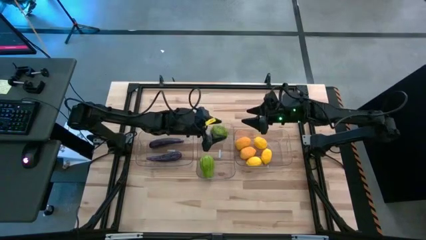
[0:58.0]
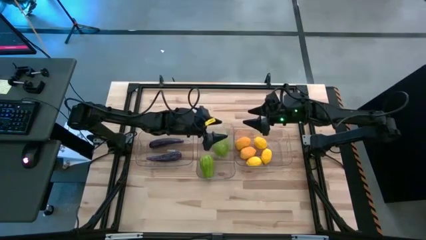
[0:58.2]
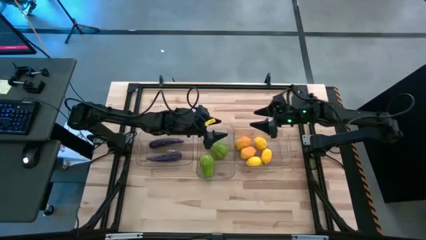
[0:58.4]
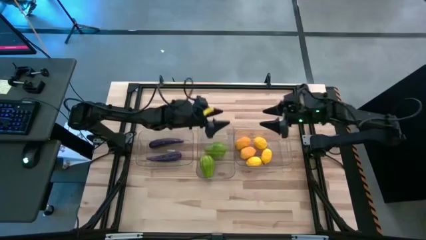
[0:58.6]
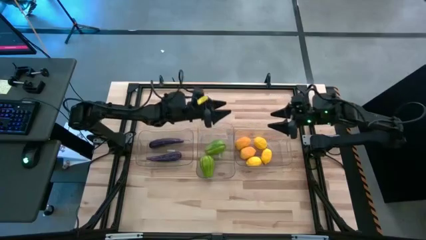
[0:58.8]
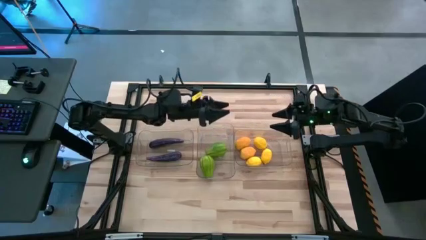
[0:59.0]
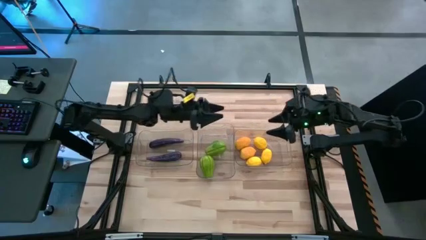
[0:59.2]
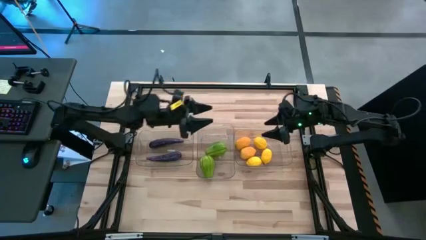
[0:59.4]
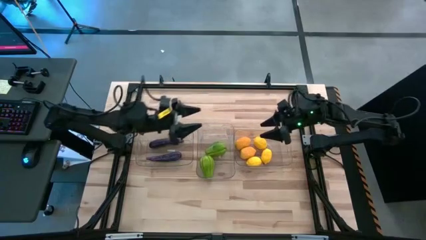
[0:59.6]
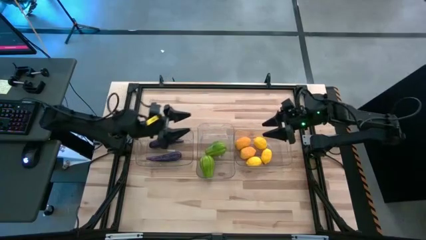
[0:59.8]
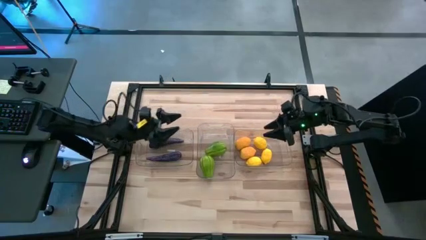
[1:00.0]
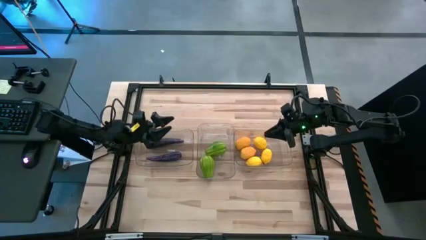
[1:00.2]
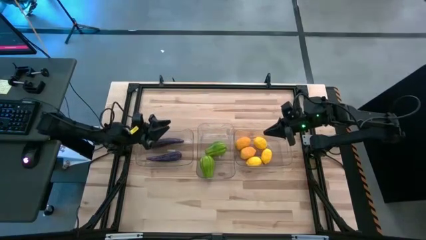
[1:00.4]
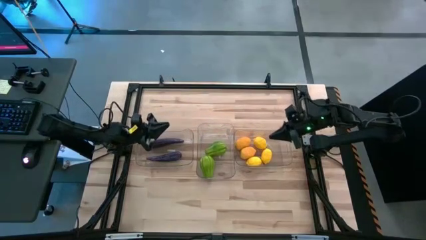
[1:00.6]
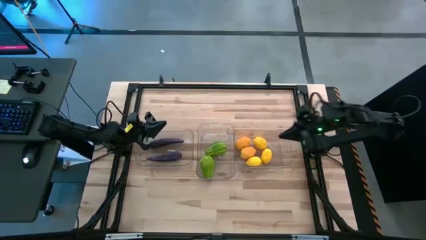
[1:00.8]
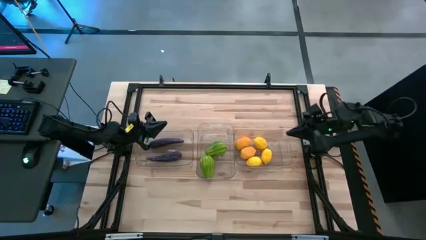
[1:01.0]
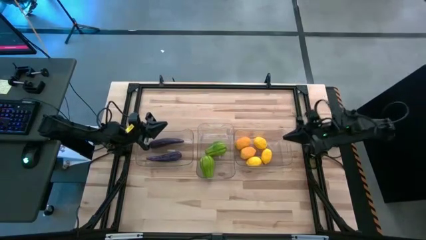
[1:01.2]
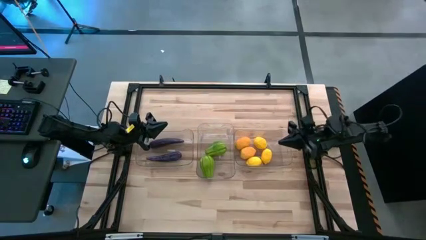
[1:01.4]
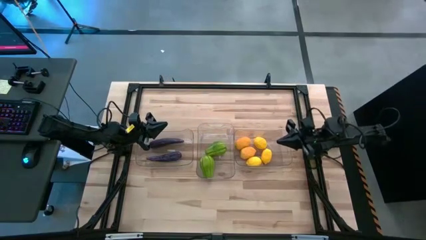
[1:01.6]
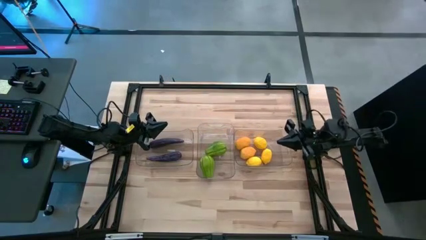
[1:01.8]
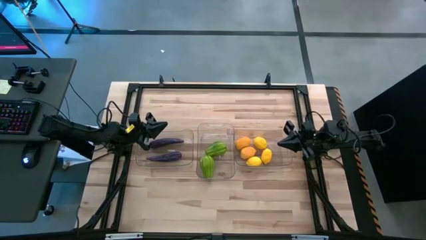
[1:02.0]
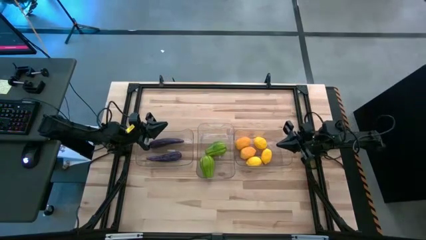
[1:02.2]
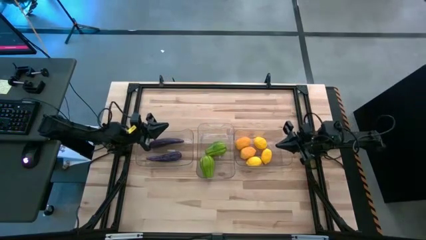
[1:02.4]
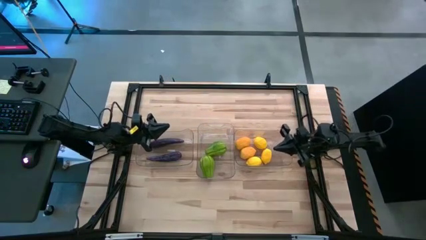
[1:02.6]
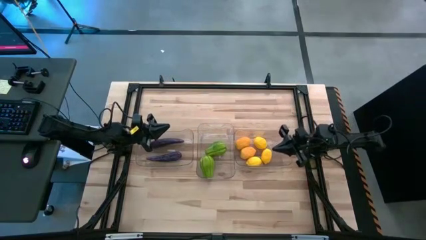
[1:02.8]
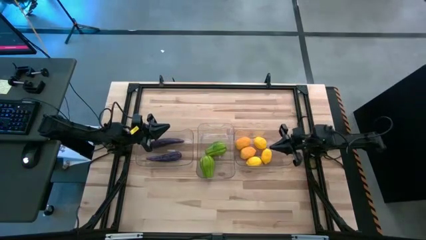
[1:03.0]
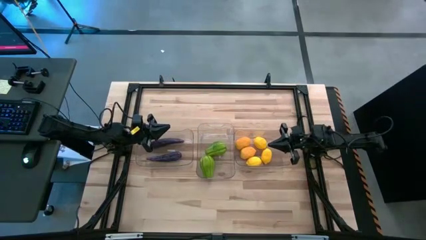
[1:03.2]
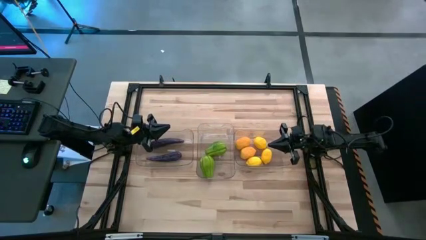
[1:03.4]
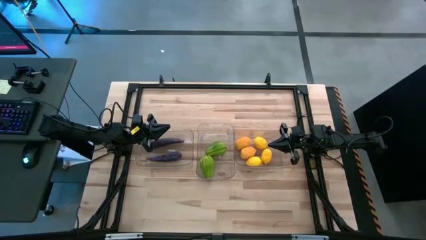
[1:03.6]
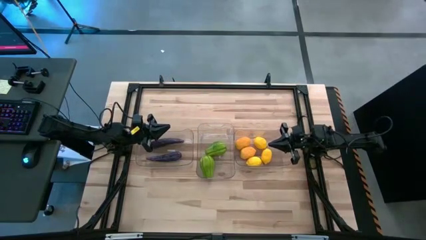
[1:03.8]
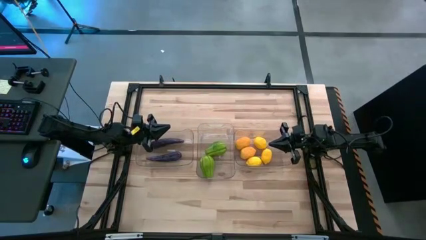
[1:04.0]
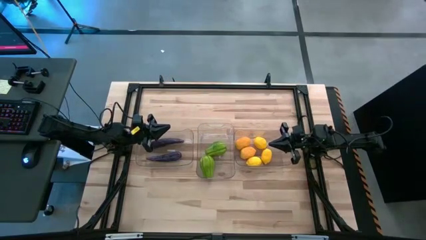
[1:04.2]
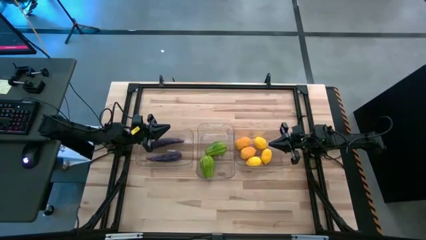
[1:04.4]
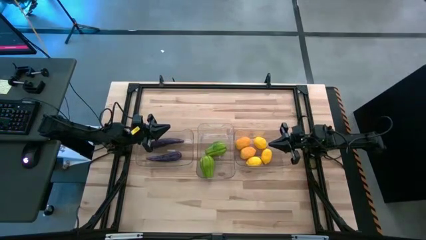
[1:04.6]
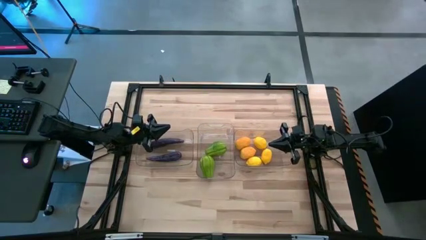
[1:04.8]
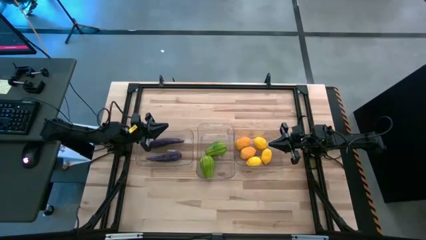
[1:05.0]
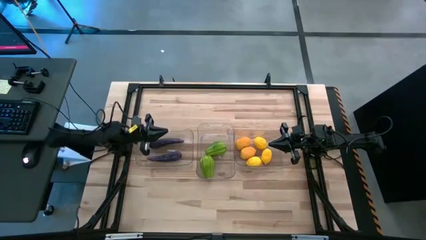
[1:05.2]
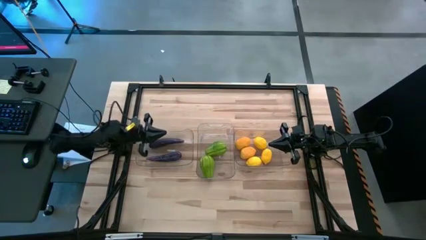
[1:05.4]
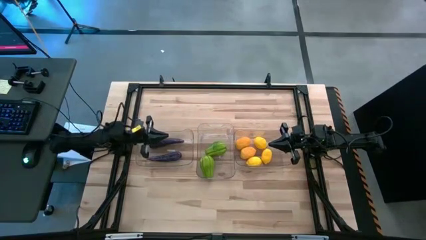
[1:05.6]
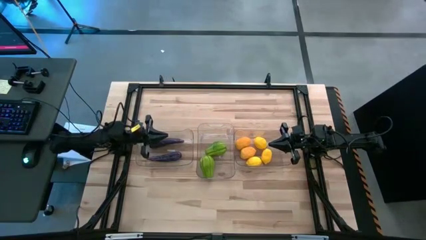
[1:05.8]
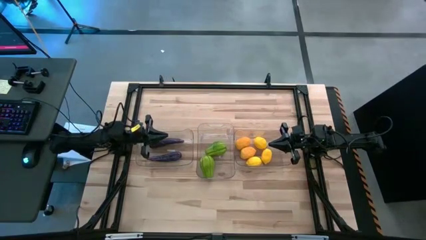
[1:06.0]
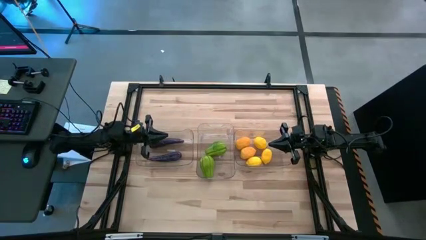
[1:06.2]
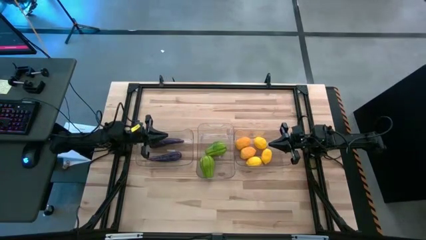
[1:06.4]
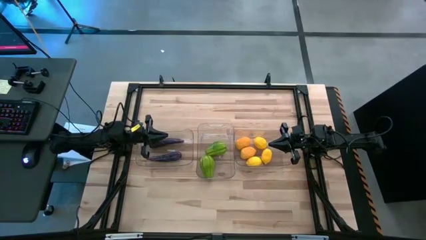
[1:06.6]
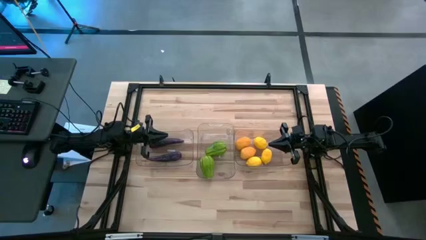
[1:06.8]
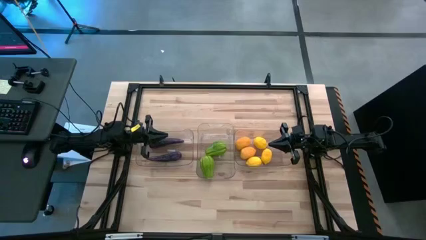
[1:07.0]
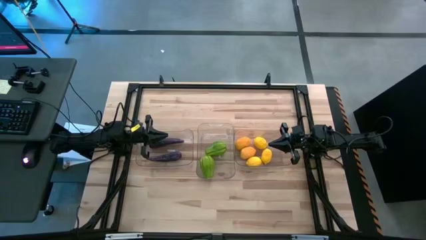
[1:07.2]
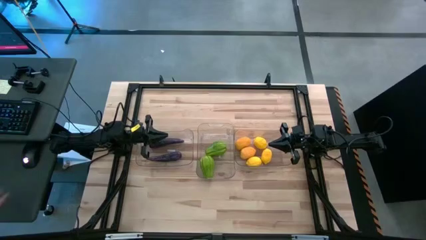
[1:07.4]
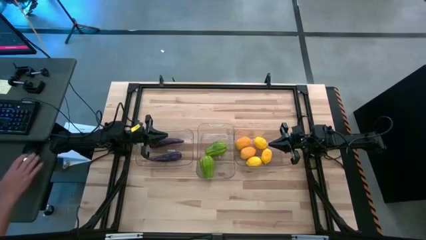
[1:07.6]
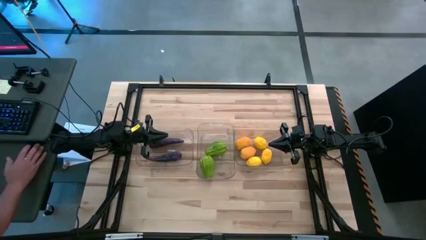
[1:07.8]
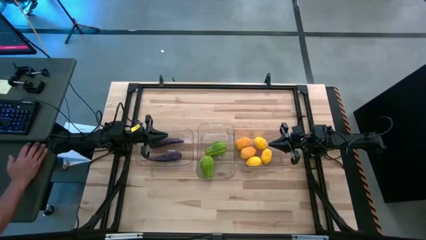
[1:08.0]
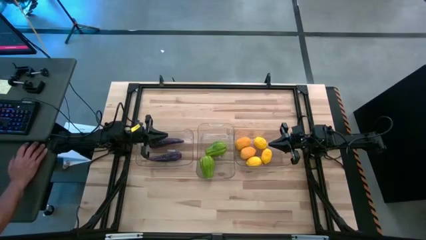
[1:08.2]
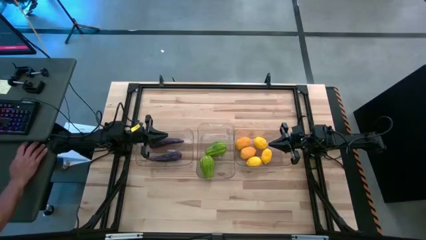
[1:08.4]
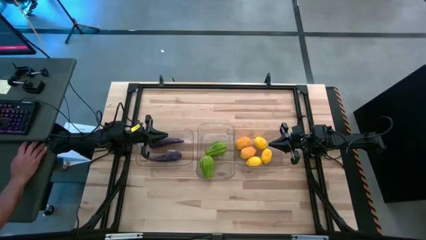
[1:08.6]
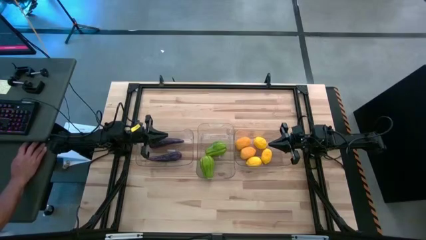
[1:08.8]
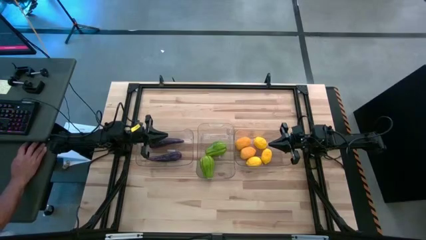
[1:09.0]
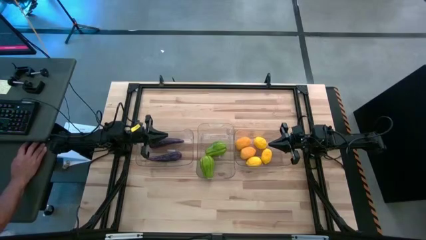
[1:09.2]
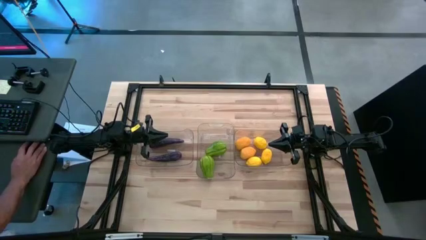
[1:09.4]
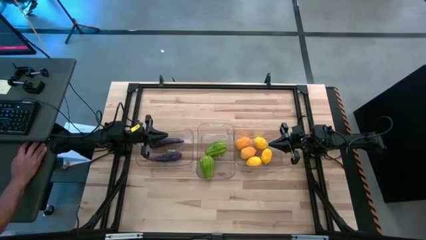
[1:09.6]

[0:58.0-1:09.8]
Task: Sort produce into baskets
Return to Home Position

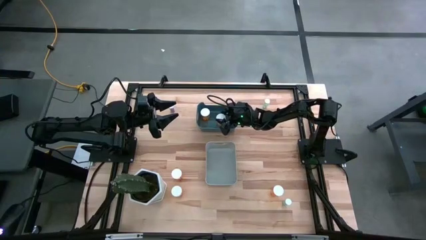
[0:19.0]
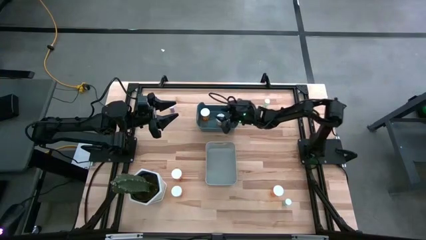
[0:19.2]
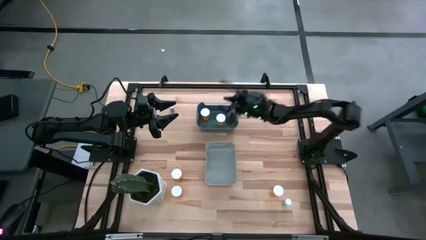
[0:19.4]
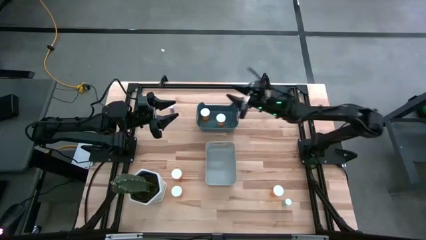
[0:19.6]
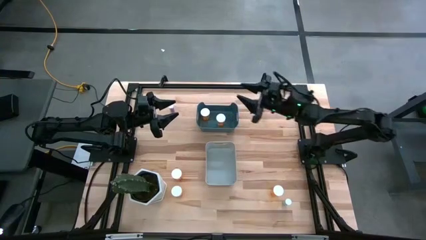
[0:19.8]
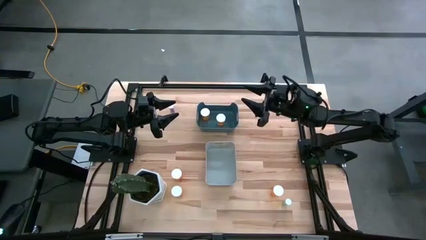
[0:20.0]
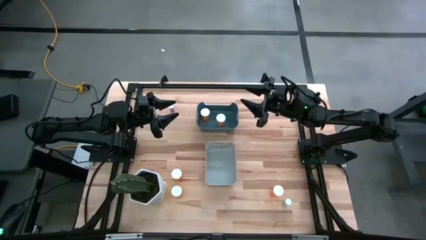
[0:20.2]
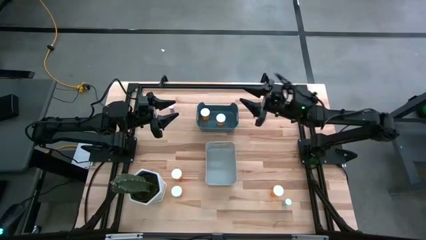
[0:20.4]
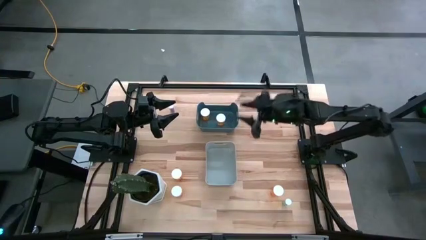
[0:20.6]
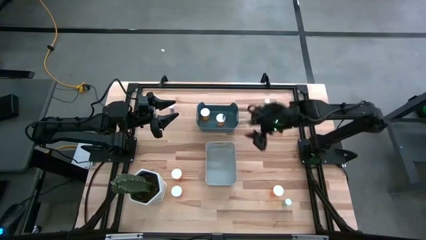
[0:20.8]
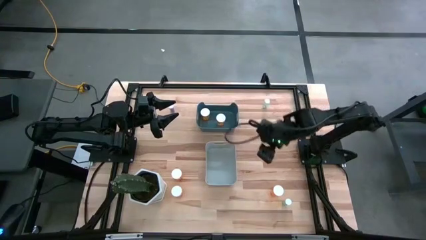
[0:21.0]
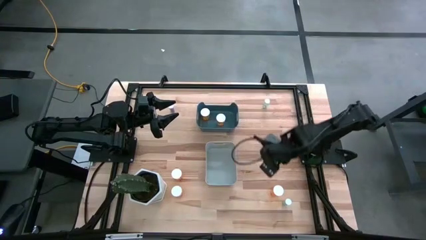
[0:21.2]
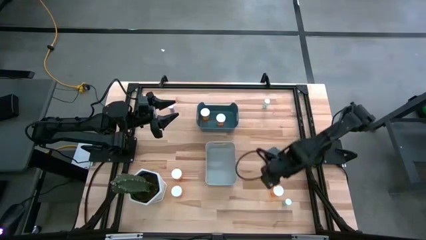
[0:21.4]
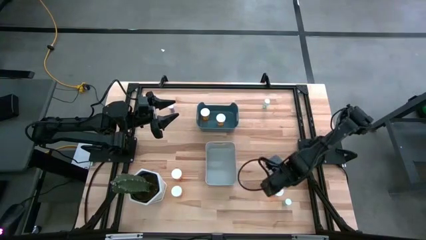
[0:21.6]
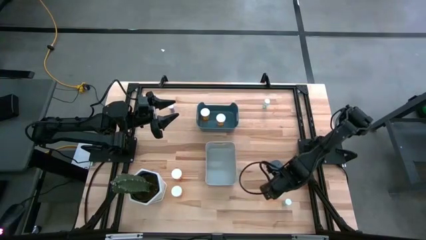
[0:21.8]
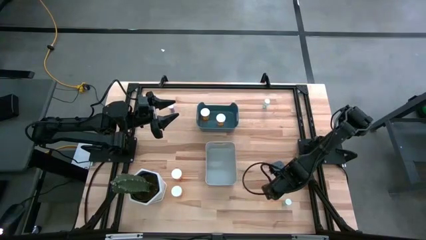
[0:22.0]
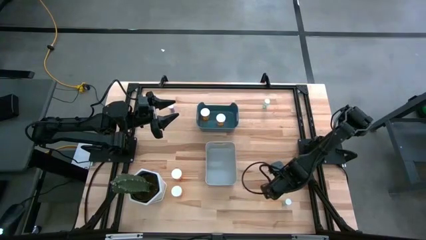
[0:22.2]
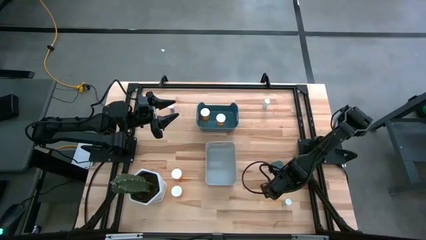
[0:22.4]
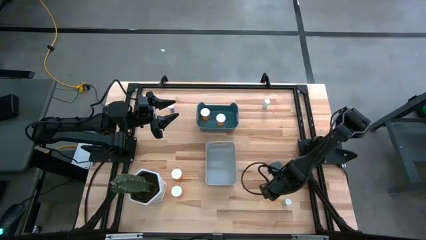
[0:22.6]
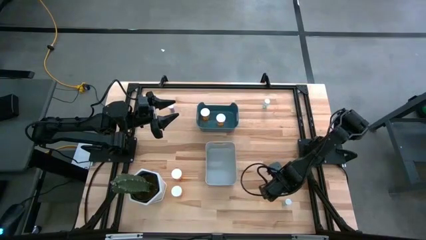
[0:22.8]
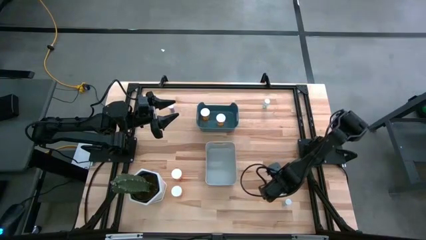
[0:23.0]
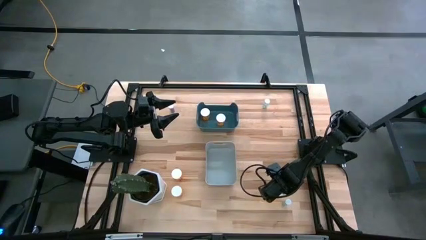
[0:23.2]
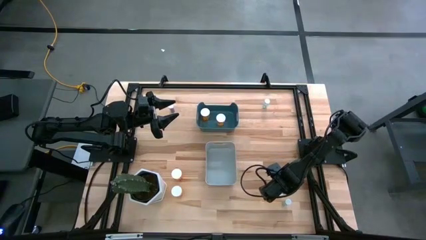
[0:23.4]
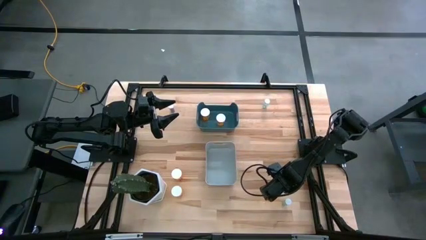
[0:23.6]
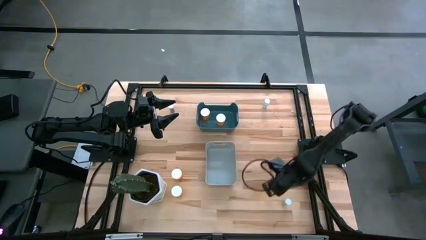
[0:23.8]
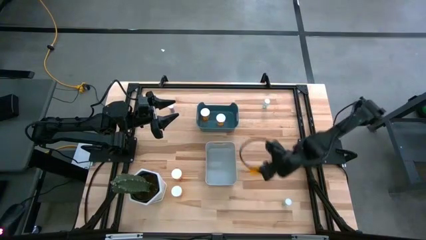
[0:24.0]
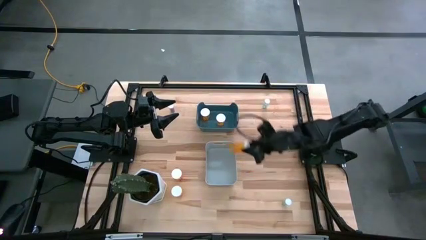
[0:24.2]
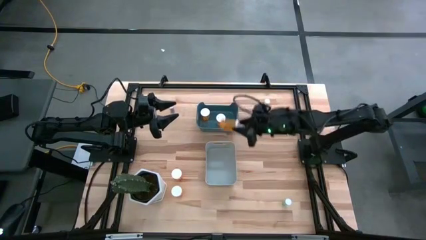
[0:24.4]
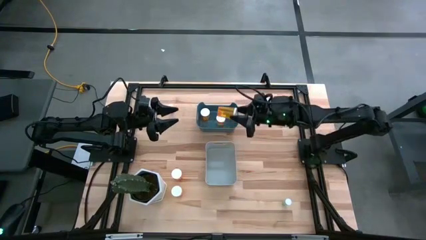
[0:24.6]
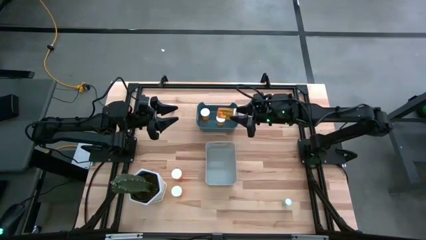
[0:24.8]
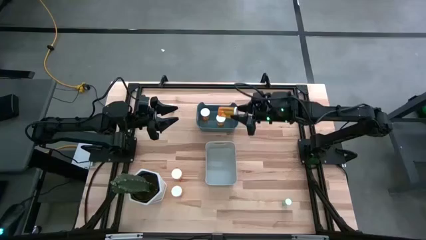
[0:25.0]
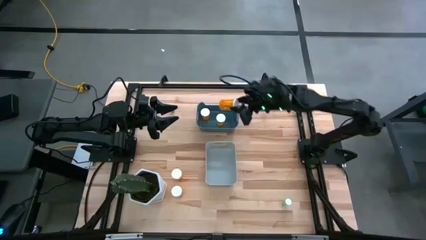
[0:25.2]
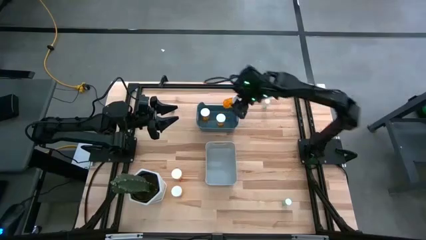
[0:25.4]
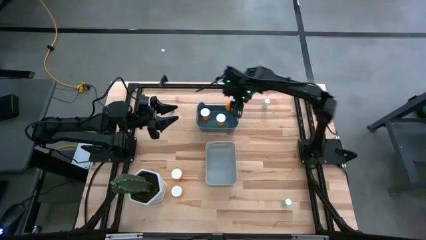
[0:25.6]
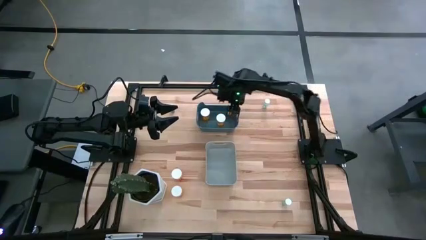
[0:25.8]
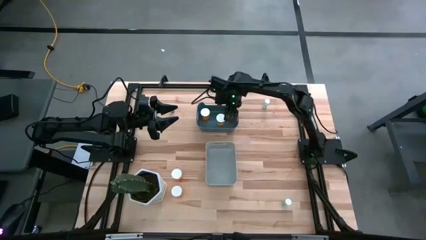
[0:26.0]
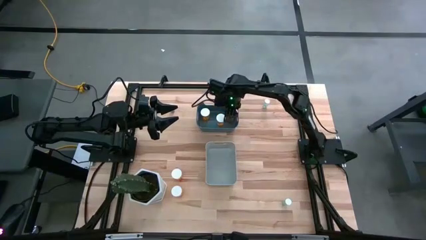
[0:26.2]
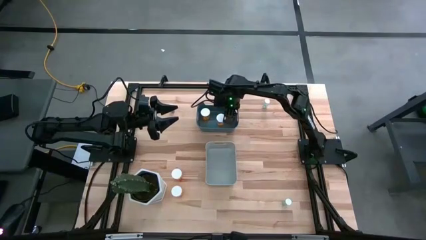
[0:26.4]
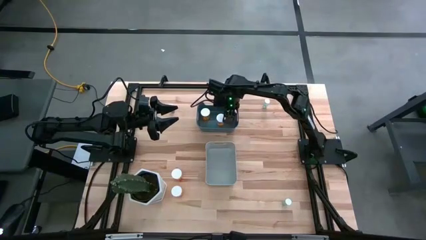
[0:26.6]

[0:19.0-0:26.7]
Task: Pick and place medicine bottles into bin by pill shape (circle, oval)
Put the orange capsule bottle into the blue bin
